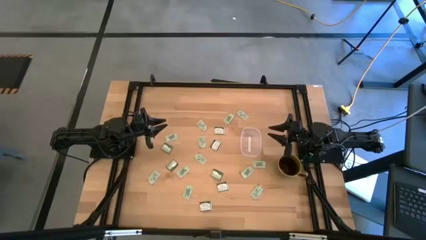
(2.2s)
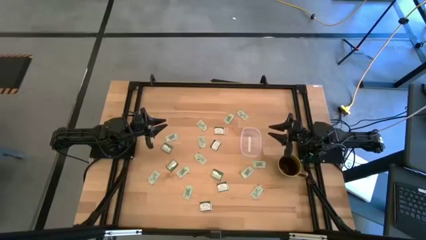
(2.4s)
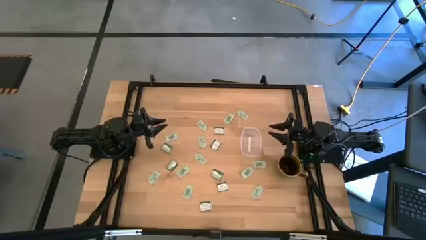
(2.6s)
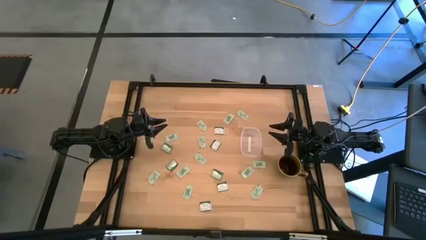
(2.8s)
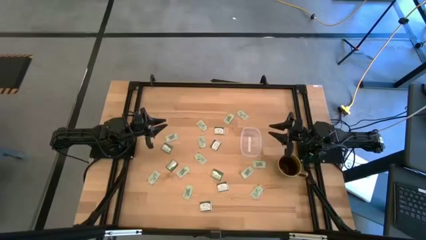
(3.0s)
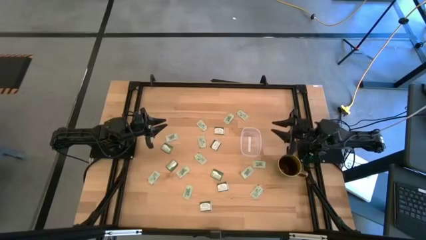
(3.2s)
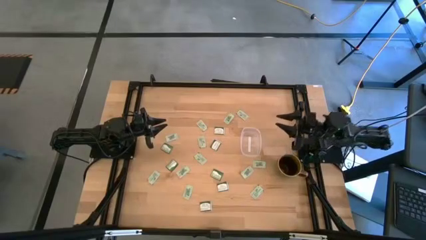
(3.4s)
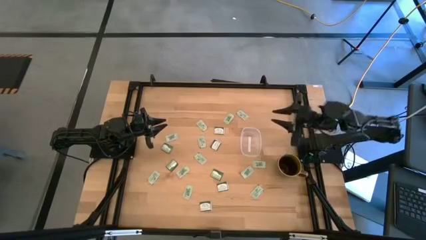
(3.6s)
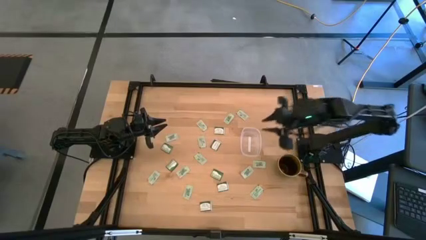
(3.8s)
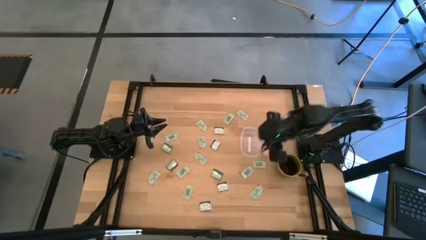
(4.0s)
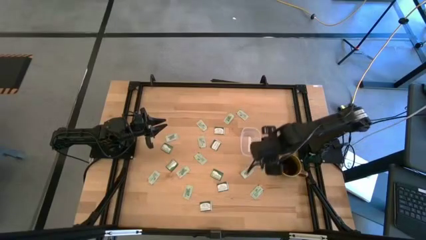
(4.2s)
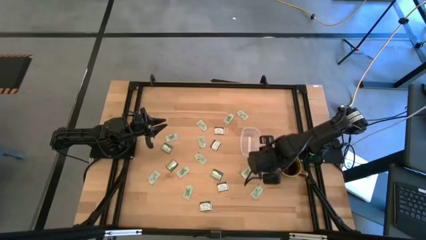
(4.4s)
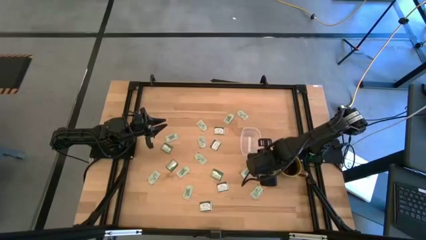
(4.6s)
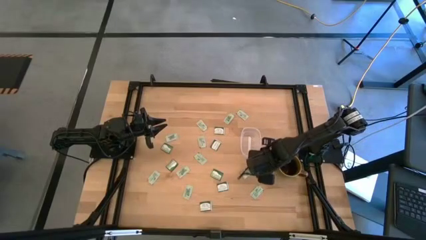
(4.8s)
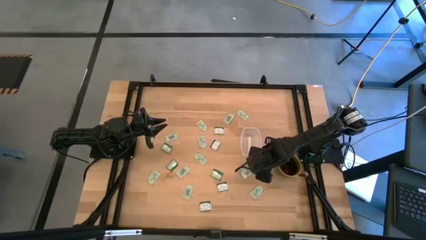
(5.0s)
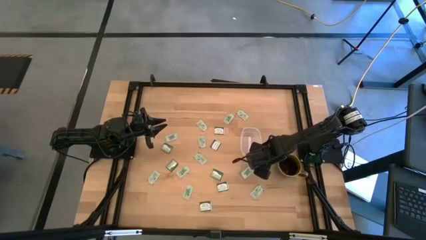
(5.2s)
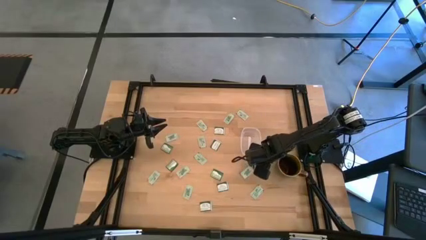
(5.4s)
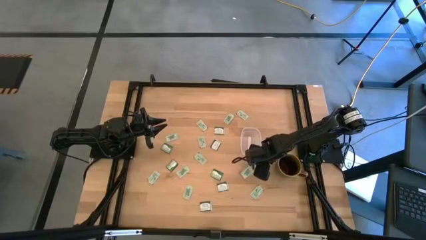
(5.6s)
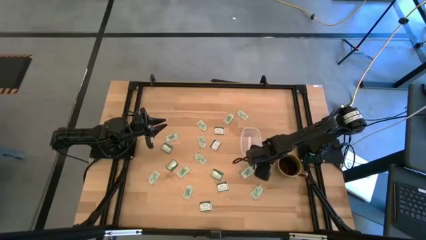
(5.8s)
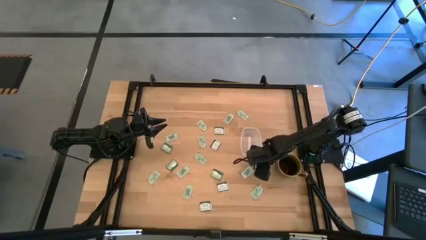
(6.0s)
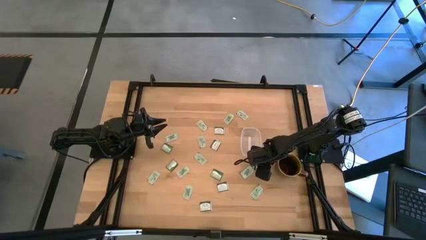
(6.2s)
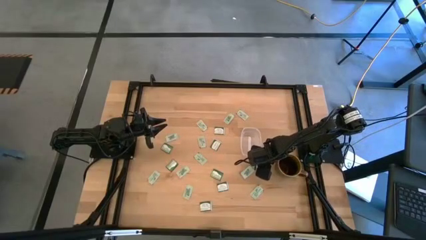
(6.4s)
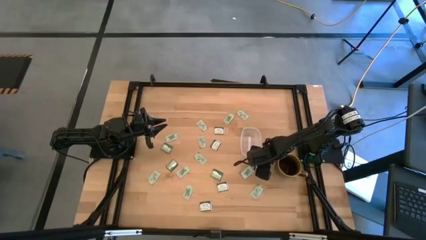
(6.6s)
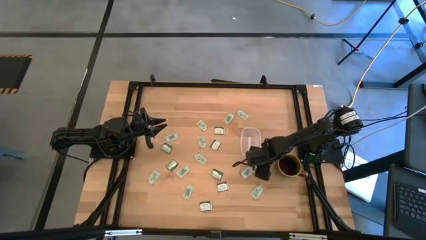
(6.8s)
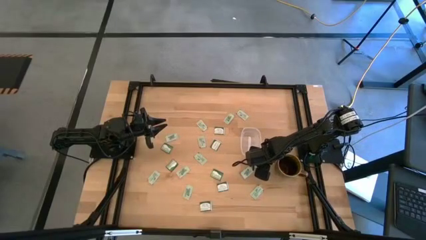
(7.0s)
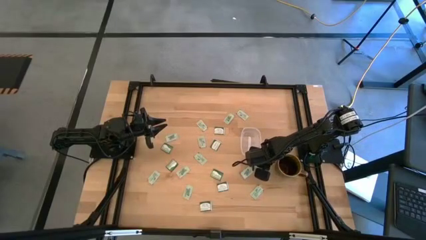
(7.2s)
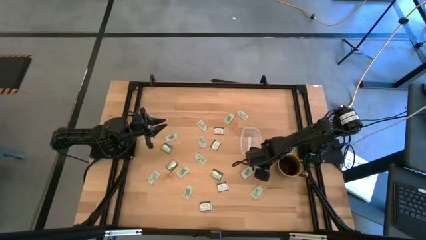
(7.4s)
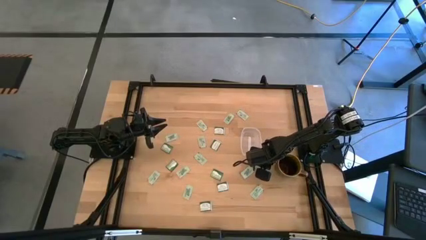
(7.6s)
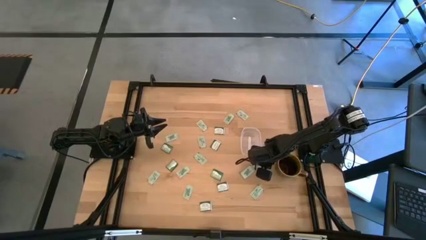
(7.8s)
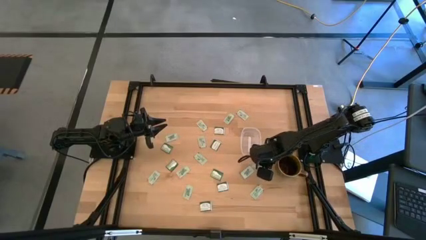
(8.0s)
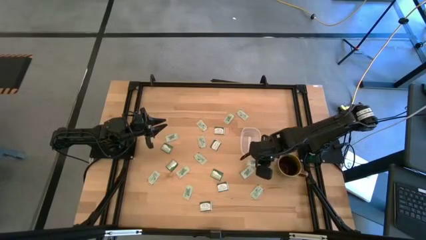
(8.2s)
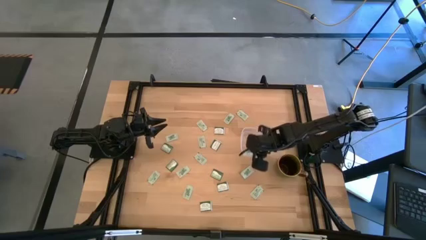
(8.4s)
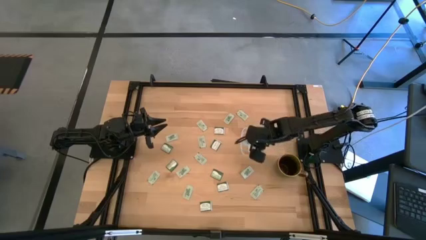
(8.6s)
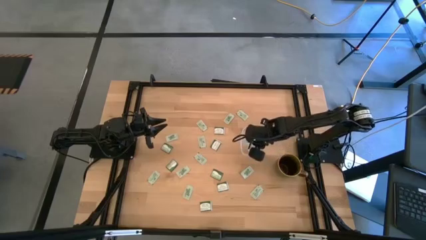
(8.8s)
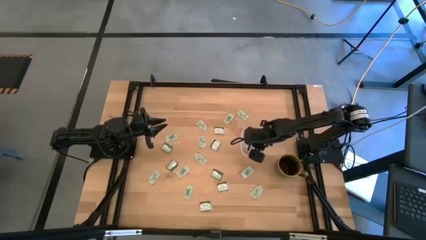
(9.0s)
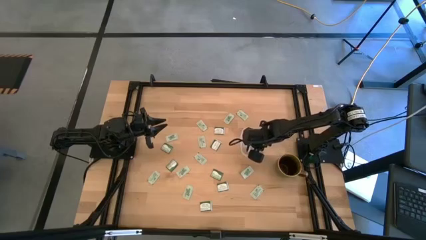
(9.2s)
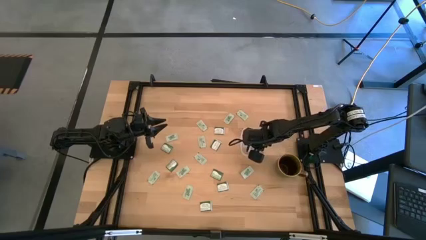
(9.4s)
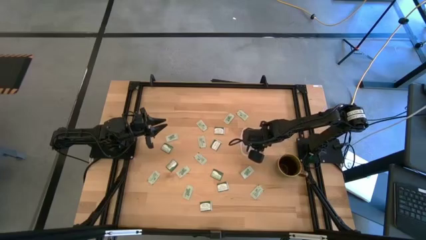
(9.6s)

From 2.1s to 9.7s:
Task: Pick and place items into bin
Put the stevia packet into the transparent bin

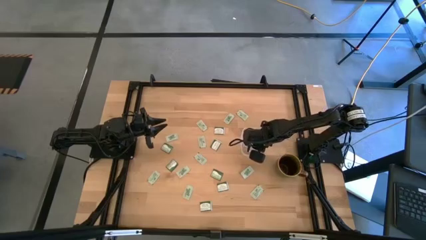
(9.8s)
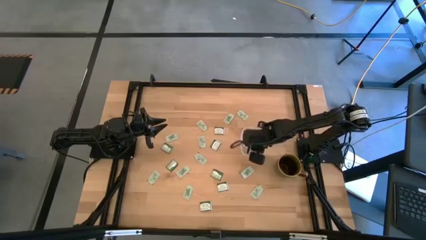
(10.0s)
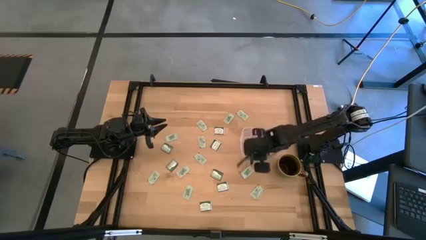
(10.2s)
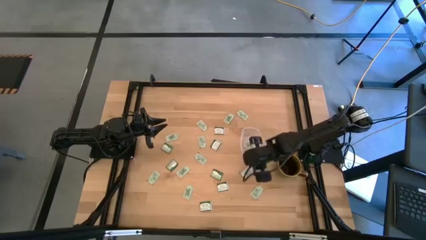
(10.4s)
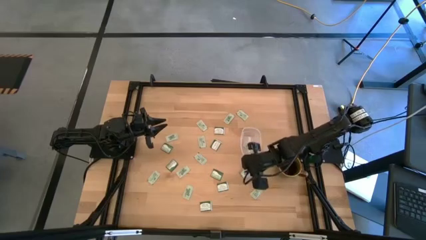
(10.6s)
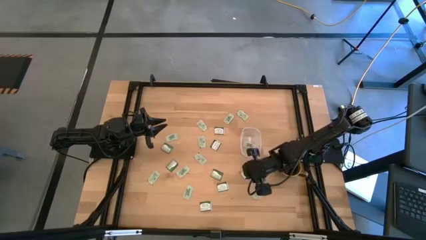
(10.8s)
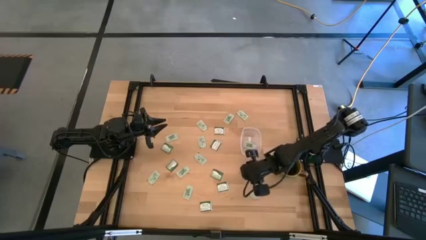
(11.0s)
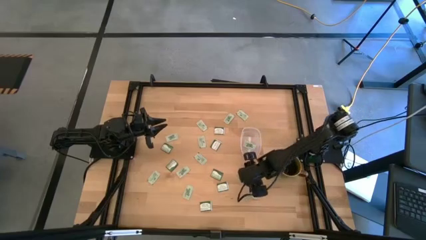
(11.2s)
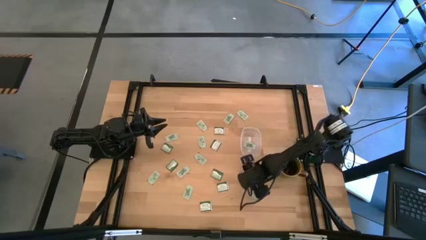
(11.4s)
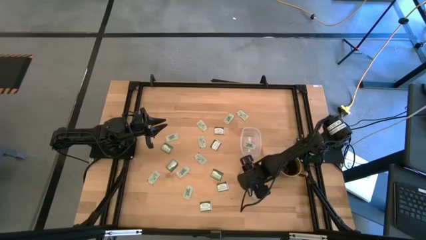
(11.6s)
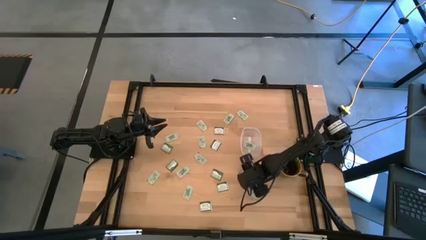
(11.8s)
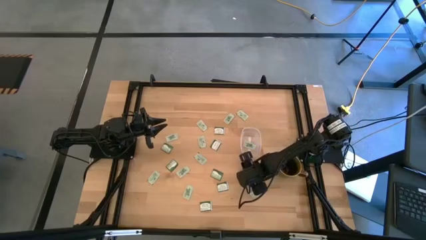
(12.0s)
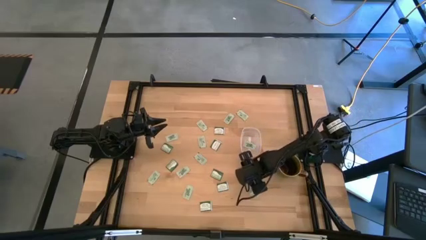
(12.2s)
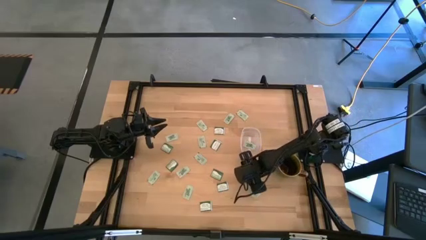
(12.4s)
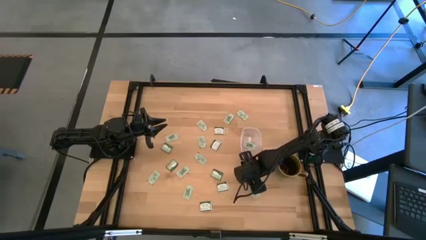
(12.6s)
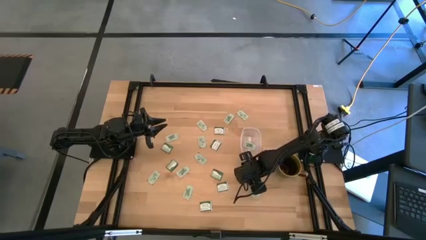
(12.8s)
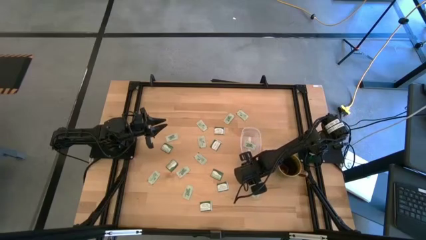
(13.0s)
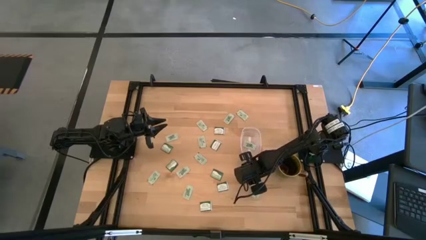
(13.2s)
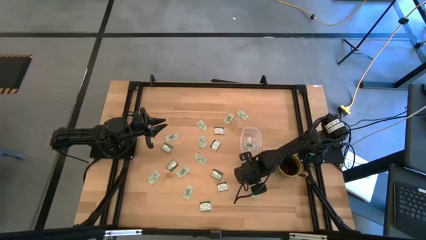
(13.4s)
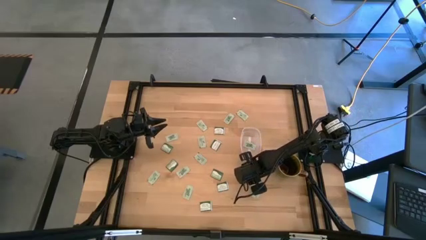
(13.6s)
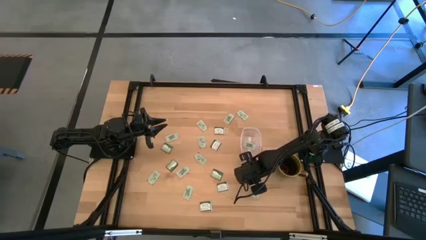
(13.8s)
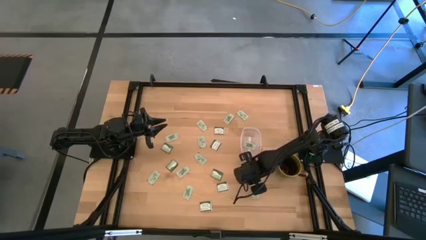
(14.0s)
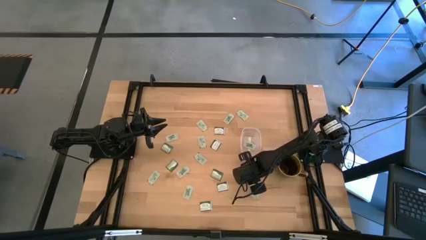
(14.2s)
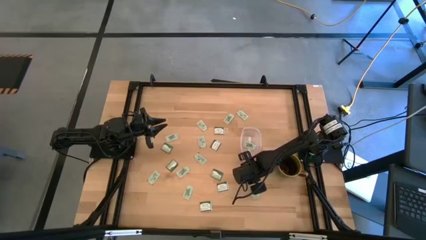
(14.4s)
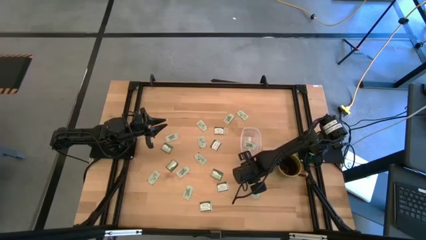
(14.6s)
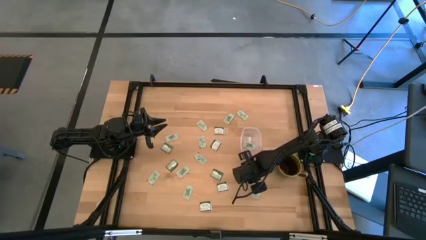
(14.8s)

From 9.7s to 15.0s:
Put the stevia packet into the transparent bin

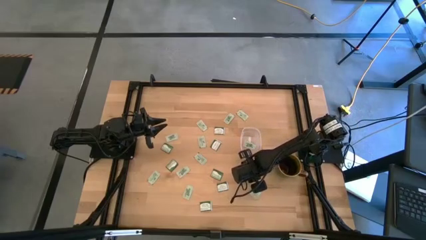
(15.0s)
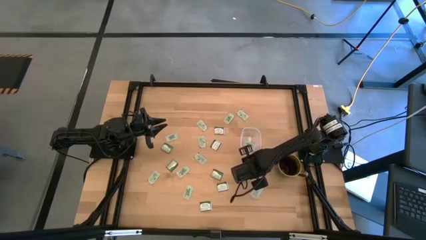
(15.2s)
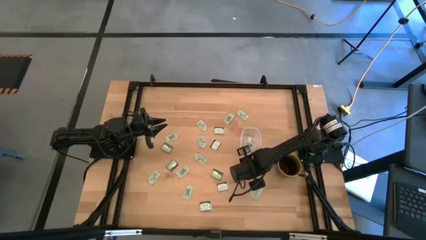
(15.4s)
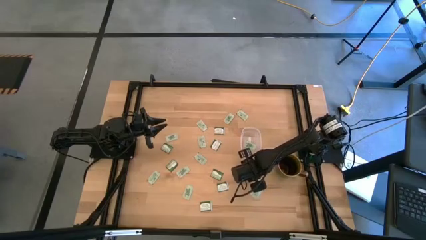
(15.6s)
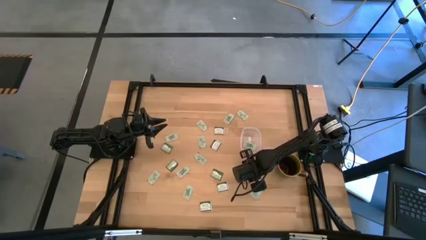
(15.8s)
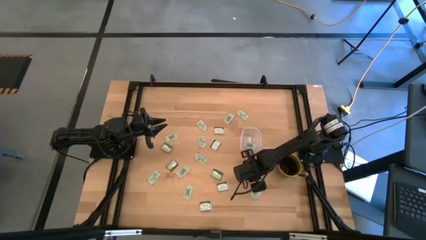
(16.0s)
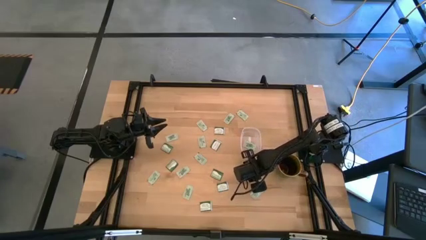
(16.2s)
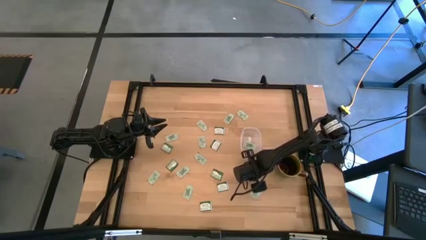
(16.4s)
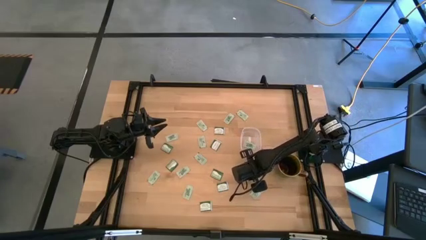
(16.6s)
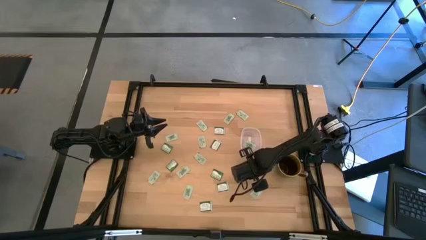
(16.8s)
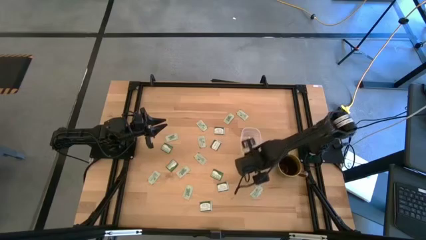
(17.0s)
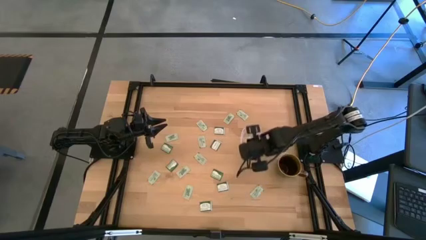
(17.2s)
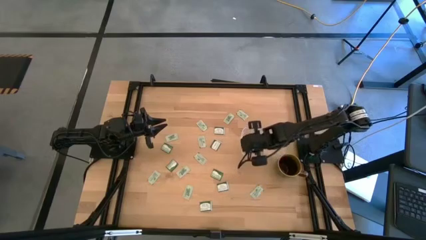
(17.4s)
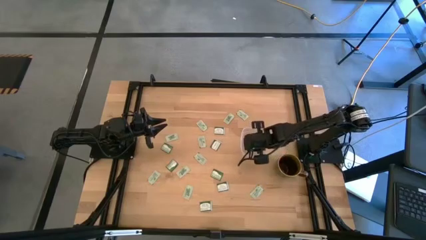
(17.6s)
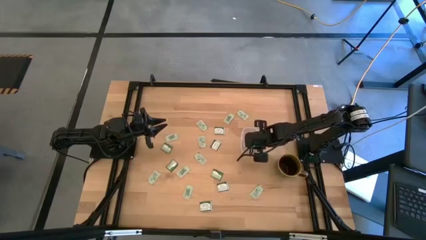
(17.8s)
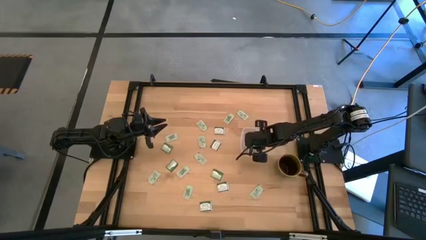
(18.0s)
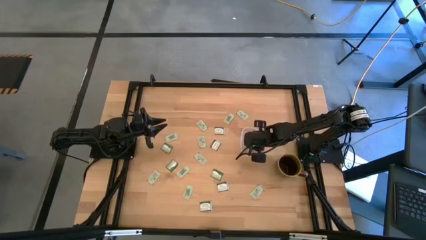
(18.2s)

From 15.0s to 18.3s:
Put the stevia packet into the transparent bin
